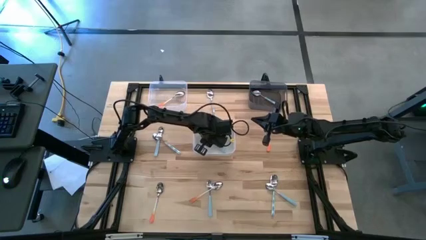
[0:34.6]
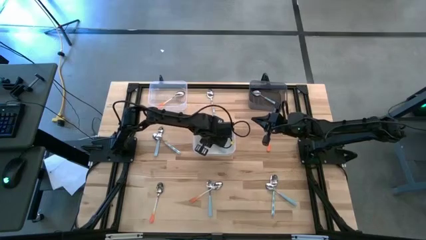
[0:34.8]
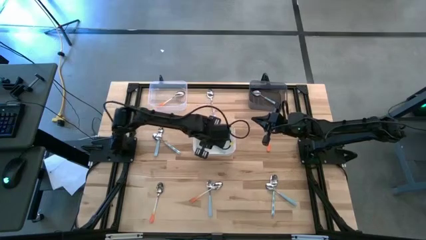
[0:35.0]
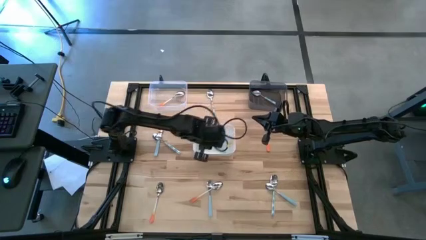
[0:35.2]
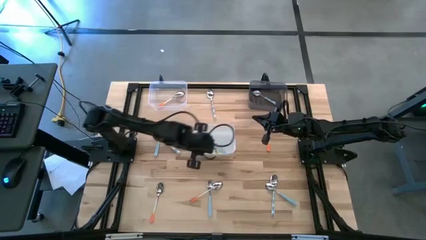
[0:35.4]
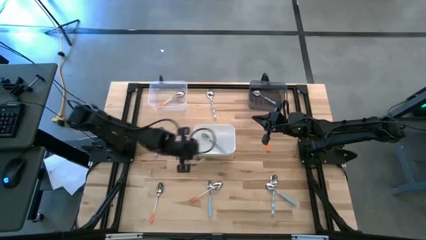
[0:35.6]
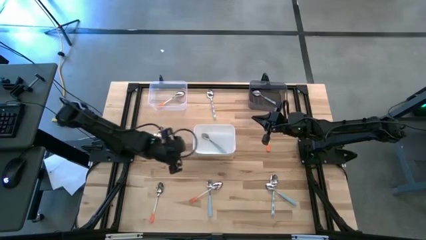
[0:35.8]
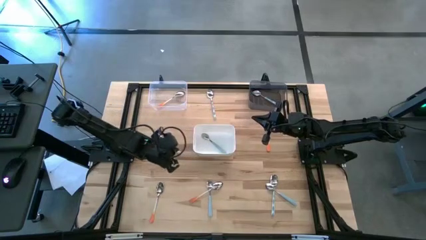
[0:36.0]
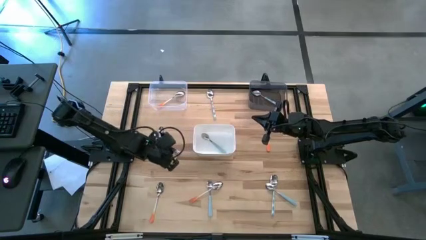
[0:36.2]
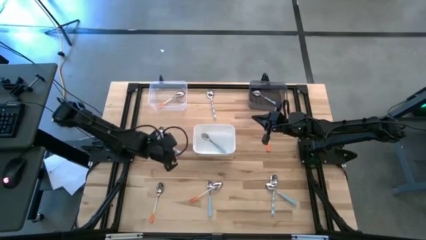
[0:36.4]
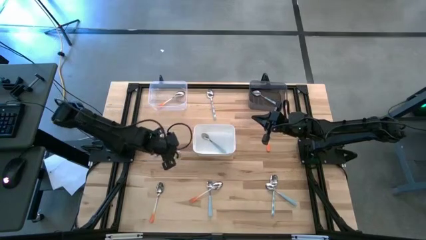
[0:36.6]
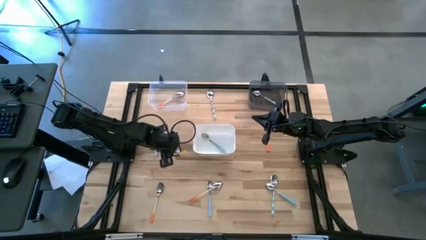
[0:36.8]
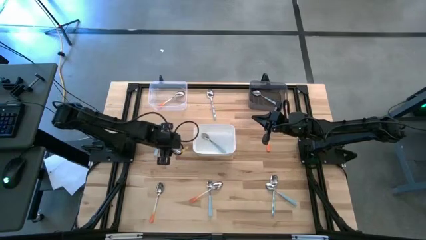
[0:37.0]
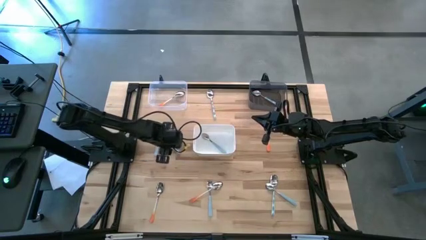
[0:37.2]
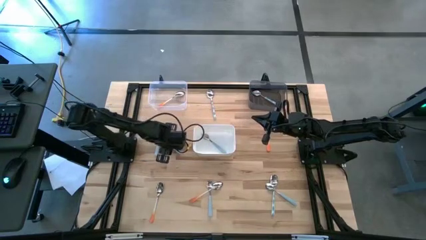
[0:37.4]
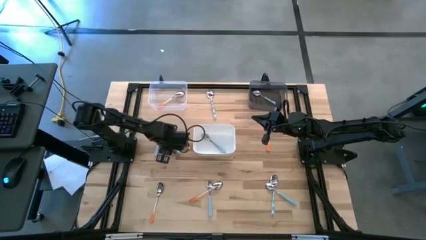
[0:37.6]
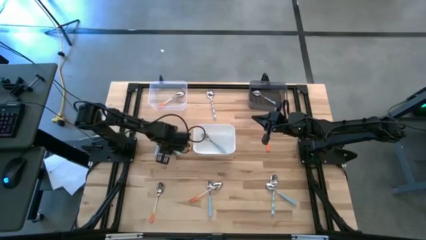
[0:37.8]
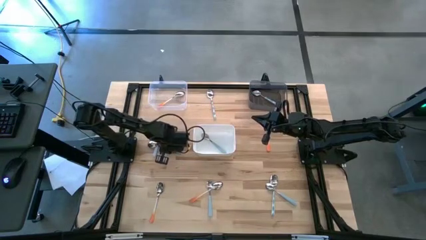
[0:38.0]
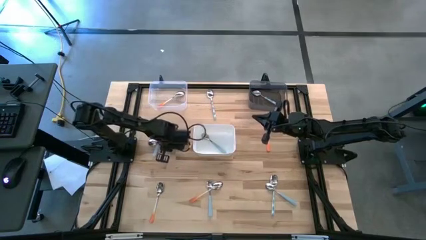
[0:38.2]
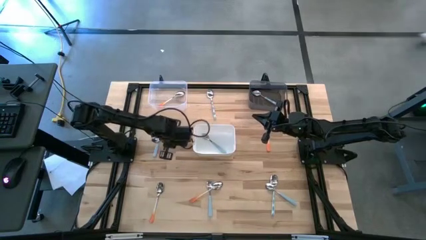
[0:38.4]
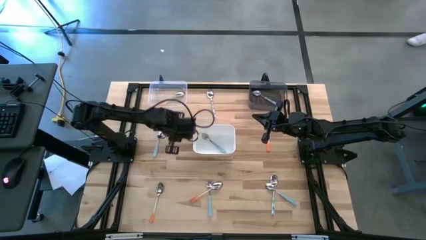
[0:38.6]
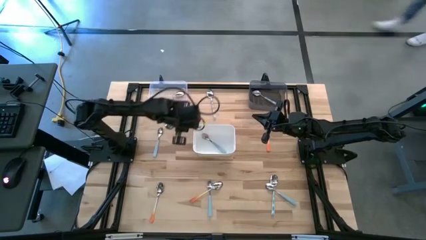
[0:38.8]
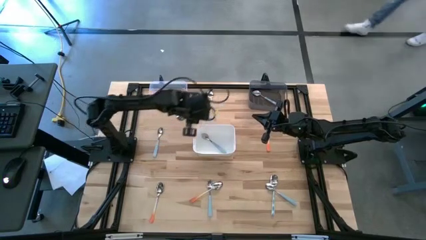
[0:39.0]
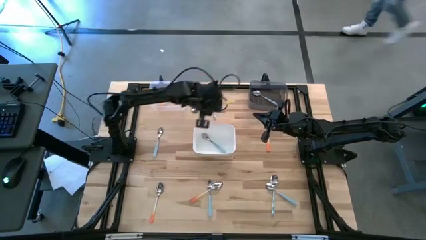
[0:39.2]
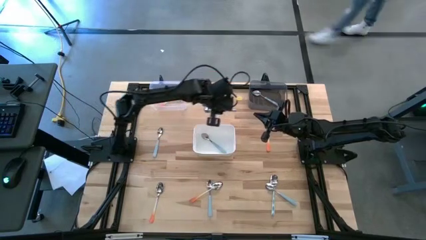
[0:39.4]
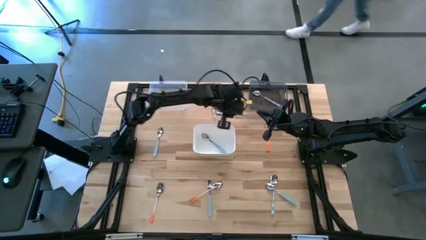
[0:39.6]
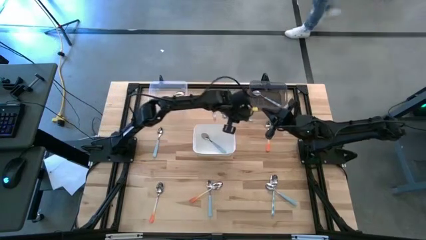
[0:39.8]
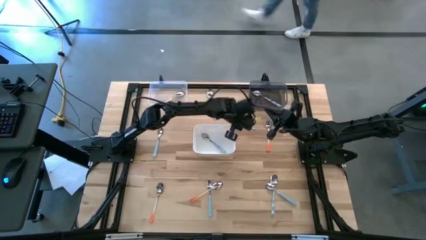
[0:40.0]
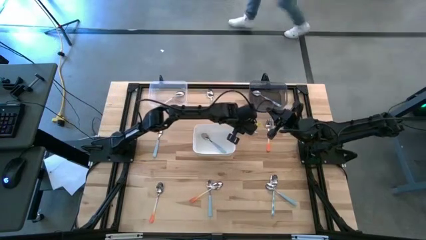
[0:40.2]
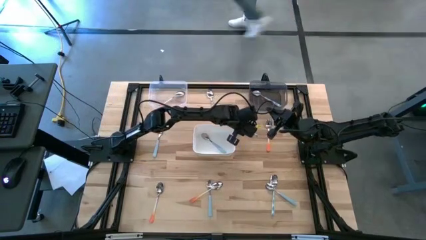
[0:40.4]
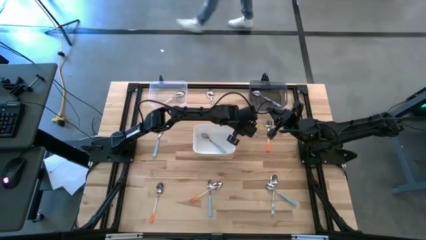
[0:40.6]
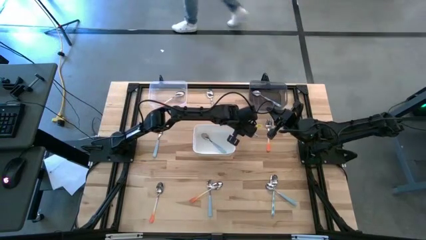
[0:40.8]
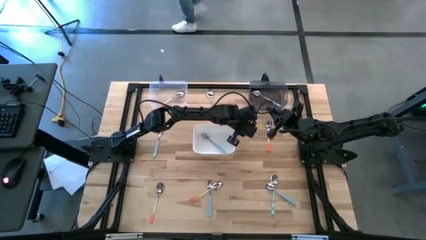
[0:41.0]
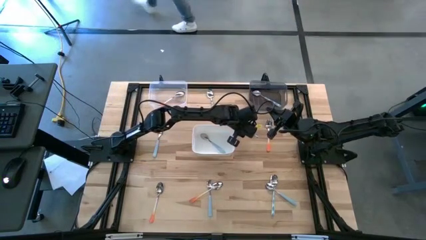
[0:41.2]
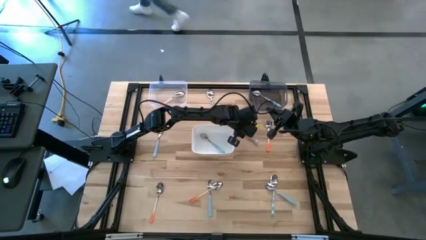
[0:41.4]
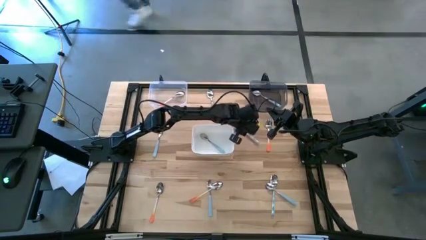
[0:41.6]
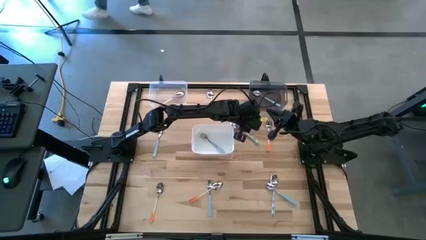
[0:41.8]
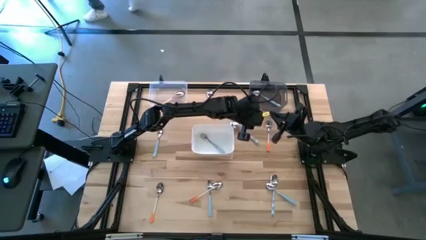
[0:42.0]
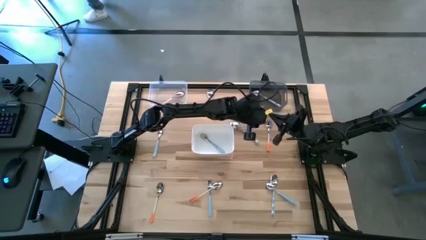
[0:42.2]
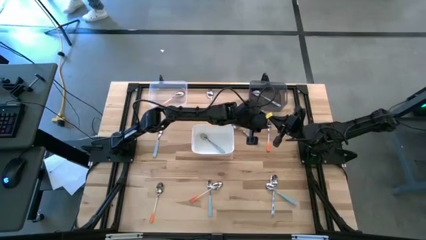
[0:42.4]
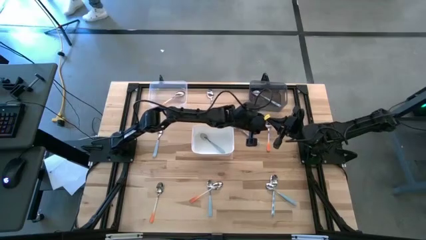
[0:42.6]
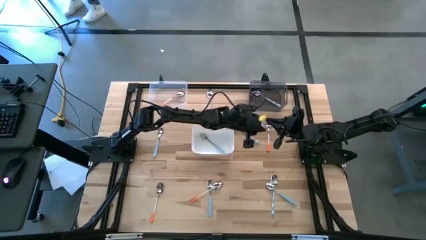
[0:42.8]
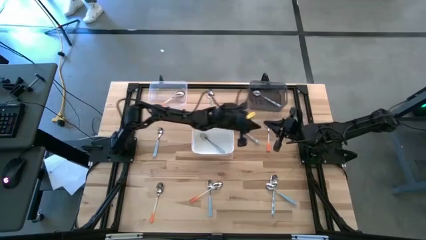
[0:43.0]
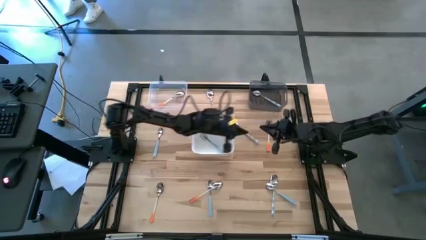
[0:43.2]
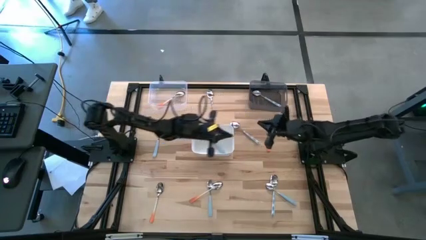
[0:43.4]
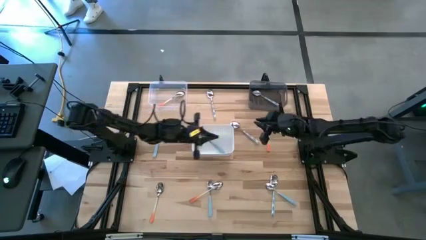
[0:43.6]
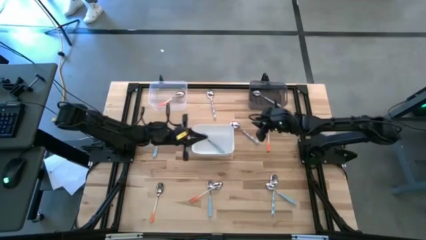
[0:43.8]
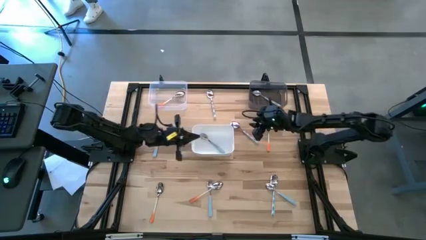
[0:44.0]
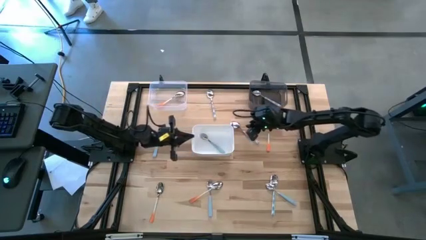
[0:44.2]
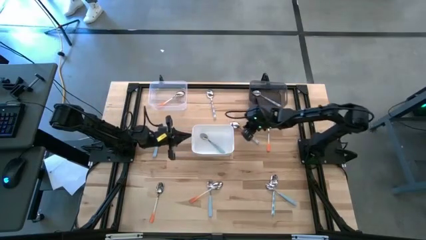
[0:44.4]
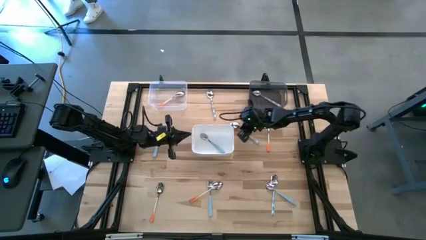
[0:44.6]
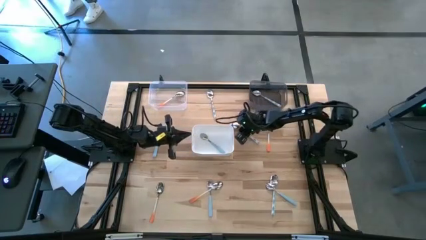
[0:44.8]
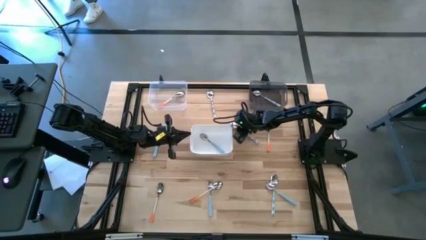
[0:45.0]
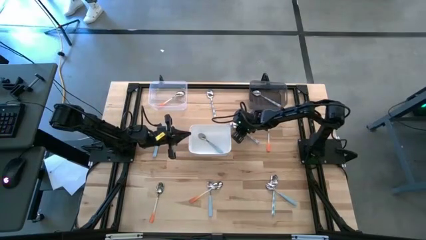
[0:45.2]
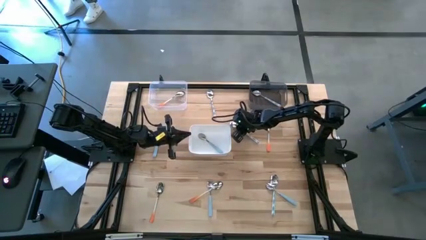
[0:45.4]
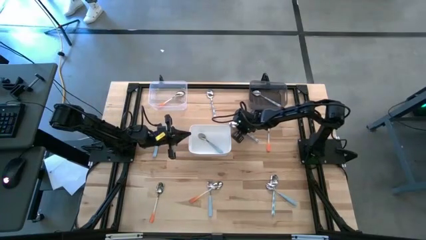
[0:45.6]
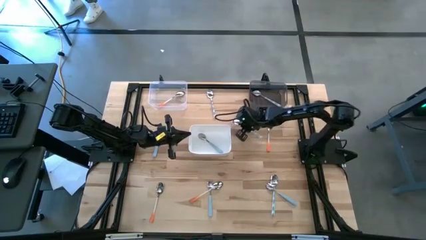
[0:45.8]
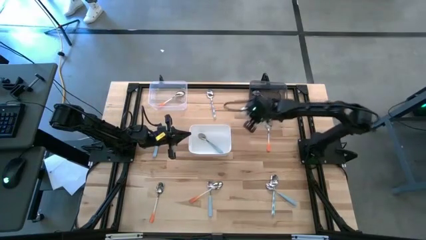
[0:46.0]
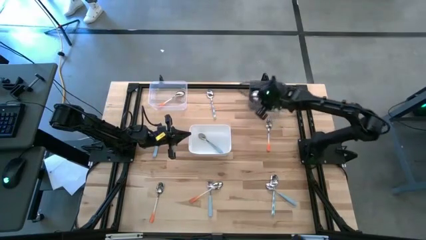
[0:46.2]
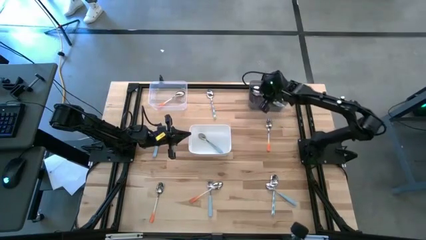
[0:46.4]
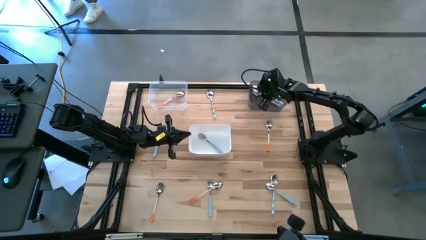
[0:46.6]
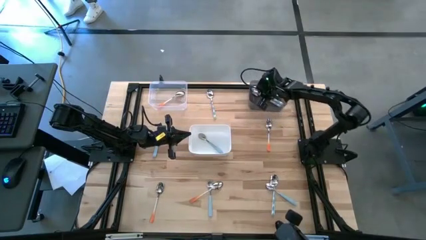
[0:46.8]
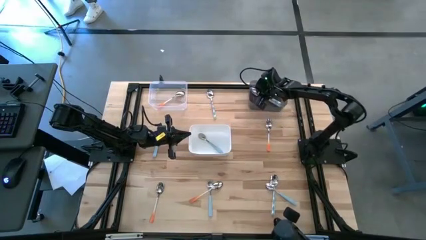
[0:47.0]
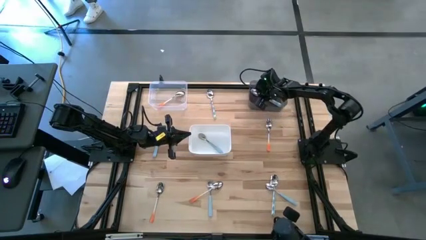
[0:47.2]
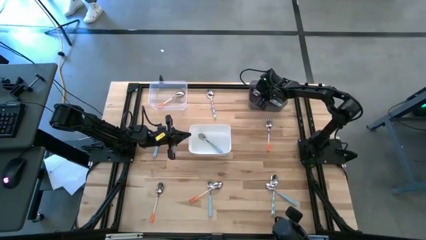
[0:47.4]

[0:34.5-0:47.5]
Task: Sort silverware by color (type)
Put the blue patterned spoon into the white bin

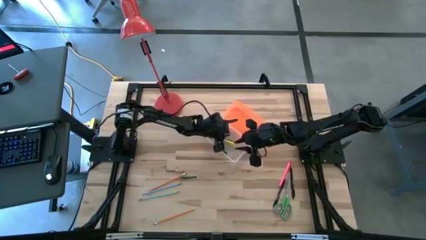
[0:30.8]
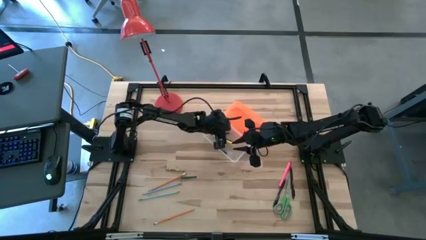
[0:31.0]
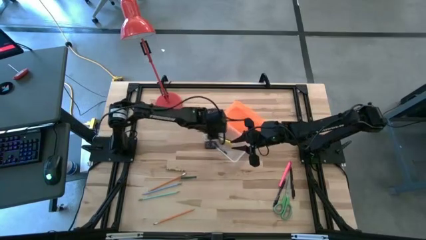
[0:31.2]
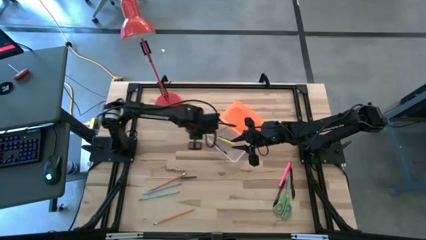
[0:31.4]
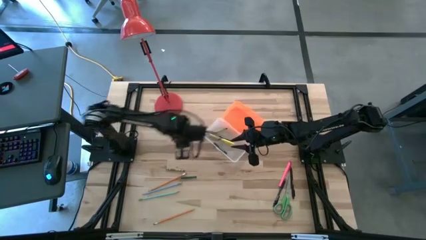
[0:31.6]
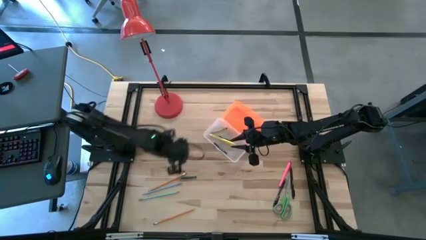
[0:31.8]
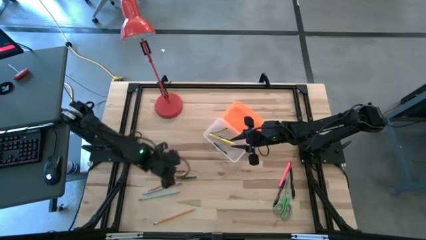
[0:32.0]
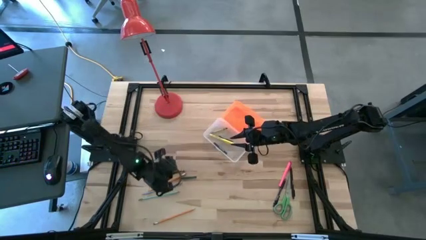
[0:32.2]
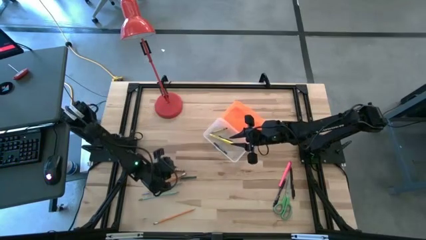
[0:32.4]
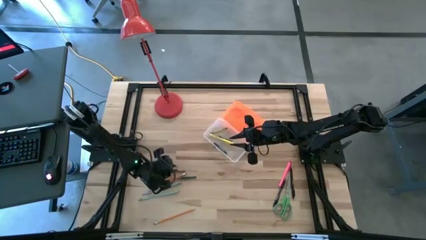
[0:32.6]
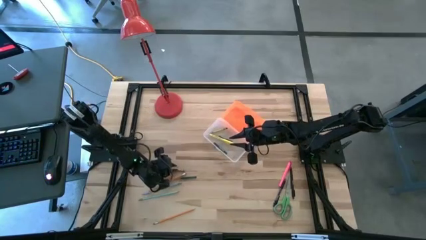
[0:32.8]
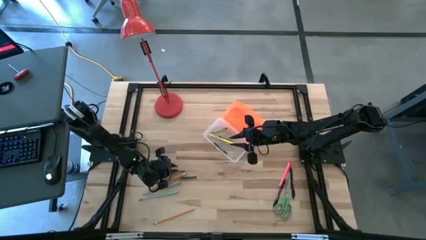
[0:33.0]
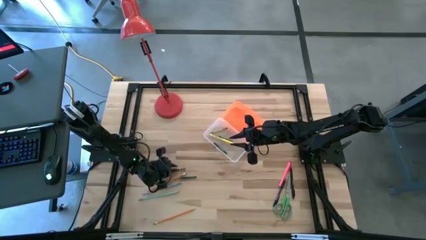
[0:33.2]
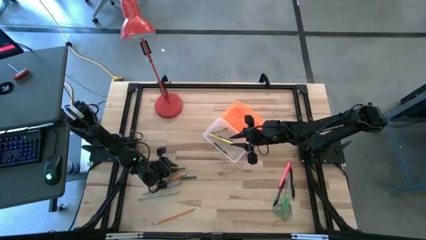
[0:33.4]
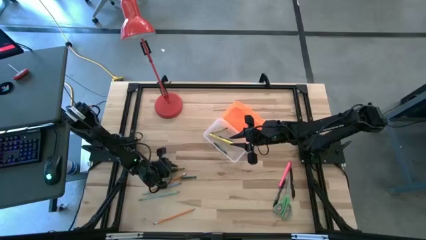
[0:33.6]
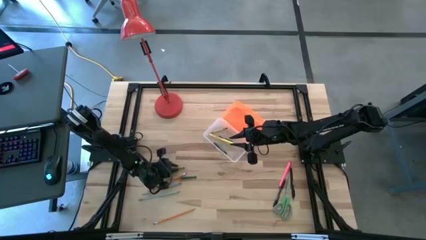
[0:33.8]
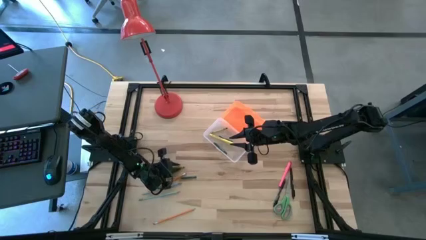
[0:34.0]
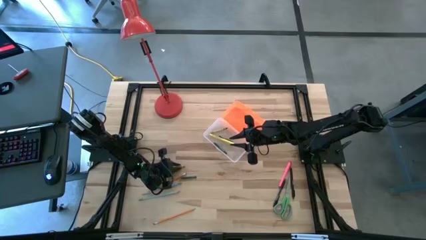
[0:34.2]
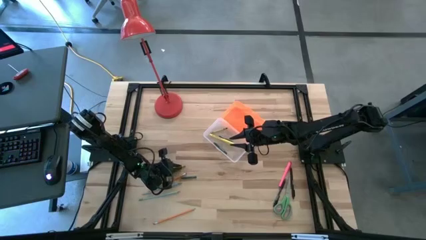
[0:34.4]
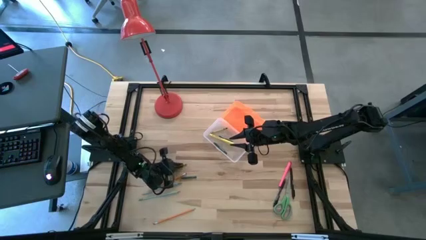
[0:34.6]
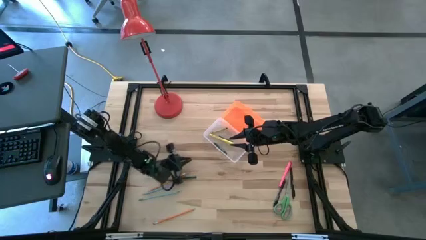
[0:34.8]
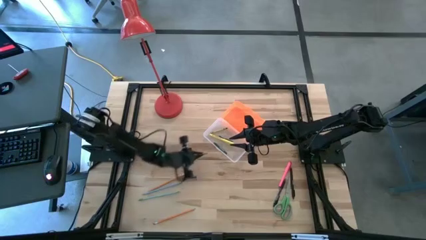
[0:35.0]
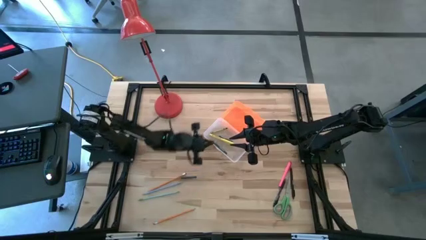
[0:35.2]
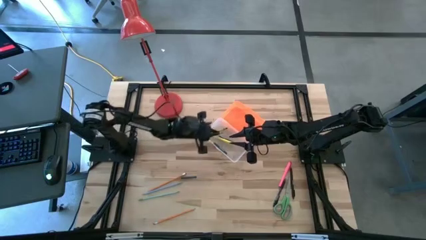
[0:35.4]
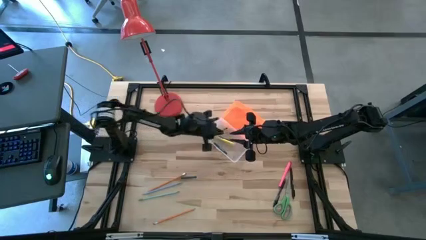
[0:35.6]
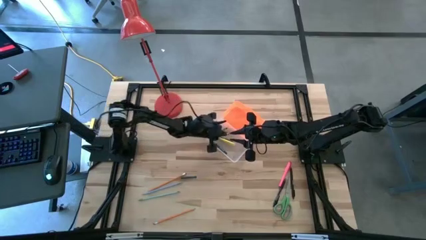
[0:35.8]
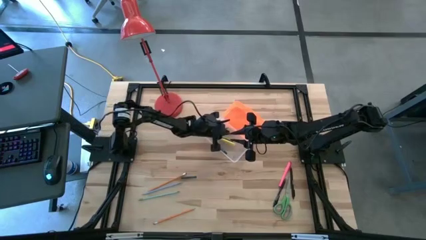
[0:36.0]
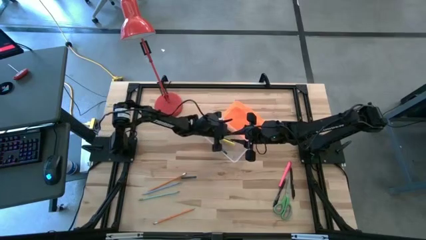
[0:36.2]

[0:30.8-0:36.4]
Task: Pick & place school supplies into a supply box
Put the green crayon into the supply box
